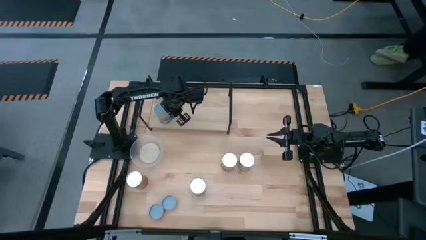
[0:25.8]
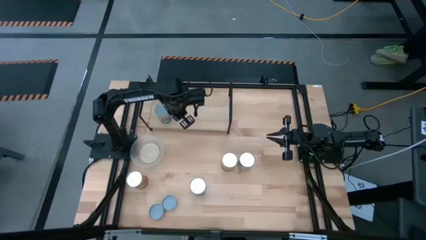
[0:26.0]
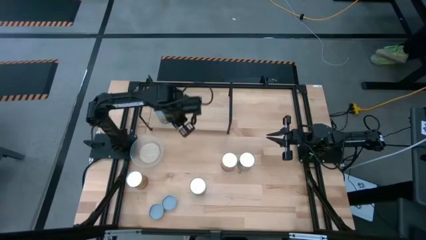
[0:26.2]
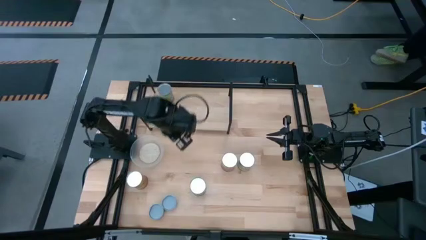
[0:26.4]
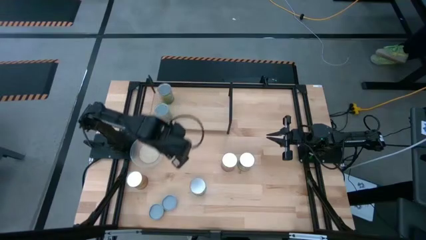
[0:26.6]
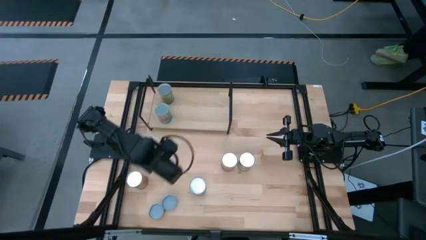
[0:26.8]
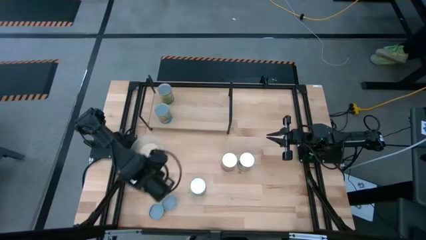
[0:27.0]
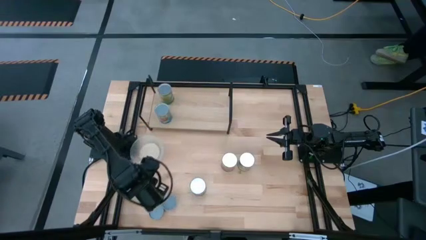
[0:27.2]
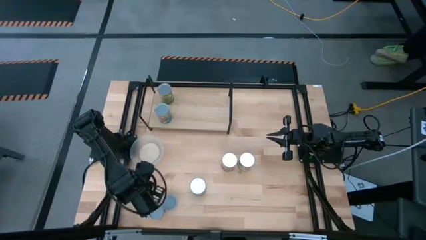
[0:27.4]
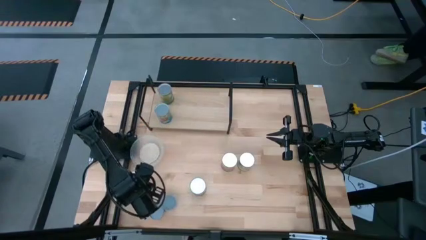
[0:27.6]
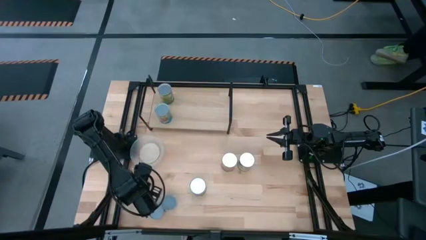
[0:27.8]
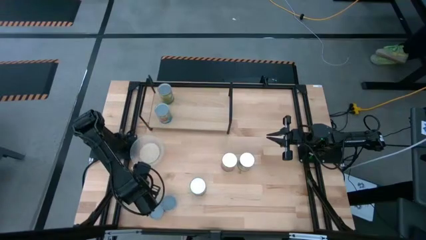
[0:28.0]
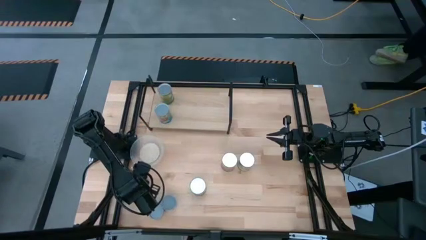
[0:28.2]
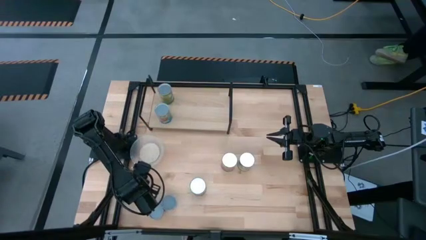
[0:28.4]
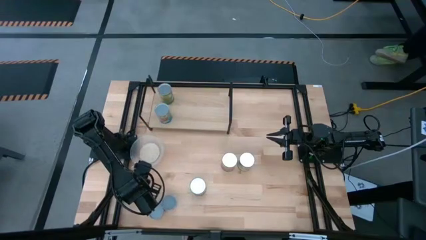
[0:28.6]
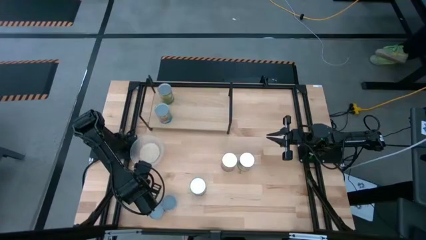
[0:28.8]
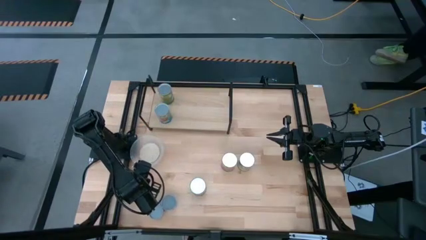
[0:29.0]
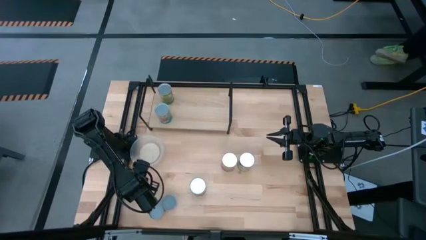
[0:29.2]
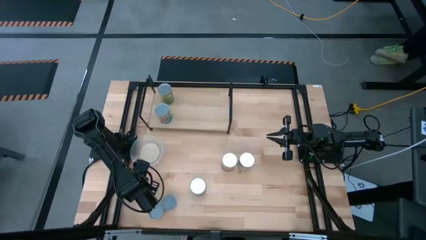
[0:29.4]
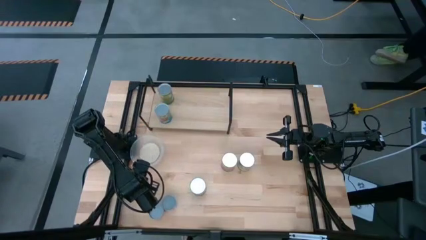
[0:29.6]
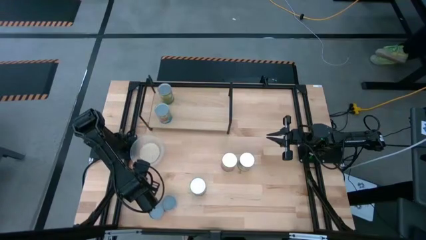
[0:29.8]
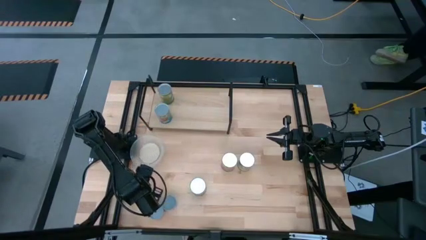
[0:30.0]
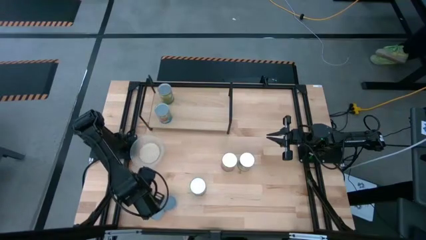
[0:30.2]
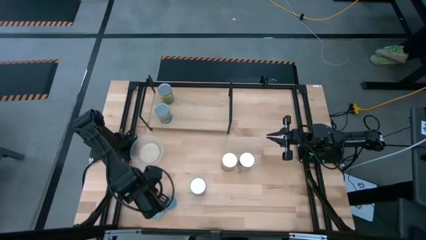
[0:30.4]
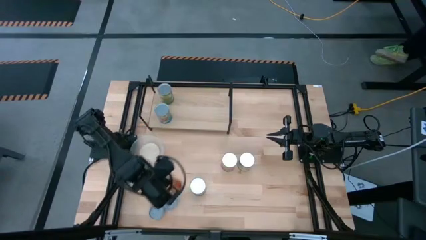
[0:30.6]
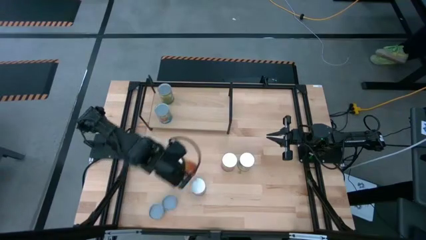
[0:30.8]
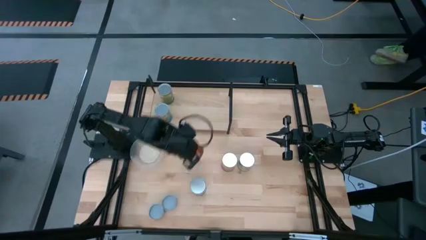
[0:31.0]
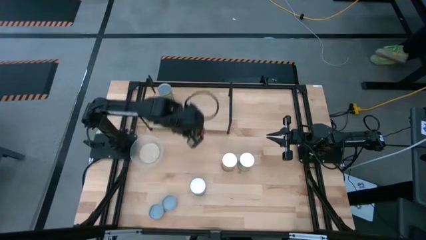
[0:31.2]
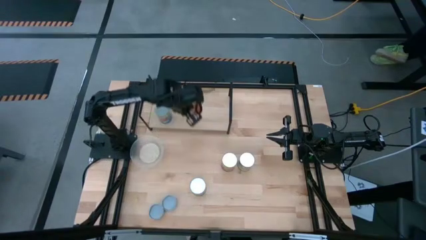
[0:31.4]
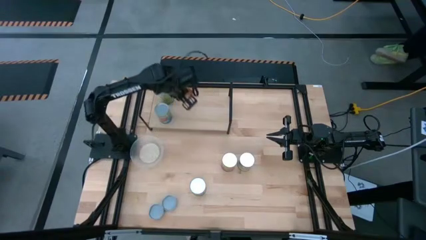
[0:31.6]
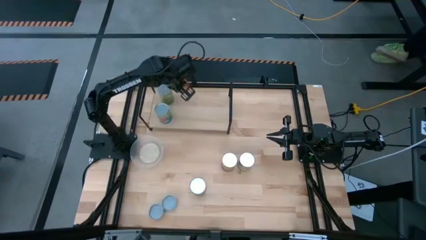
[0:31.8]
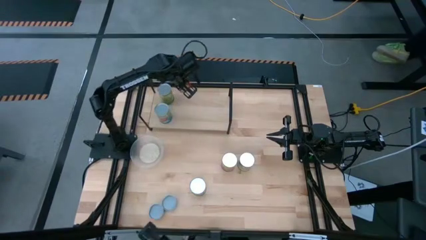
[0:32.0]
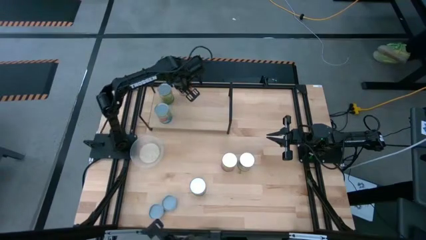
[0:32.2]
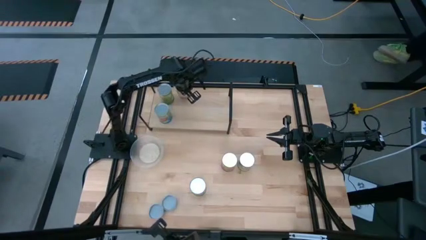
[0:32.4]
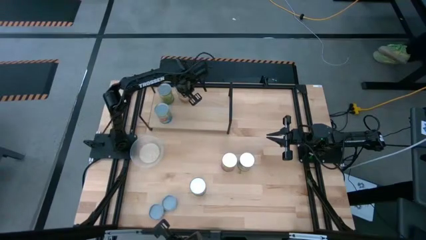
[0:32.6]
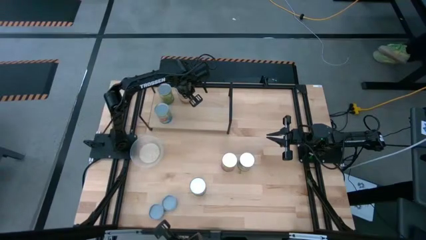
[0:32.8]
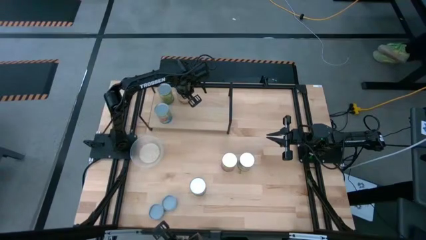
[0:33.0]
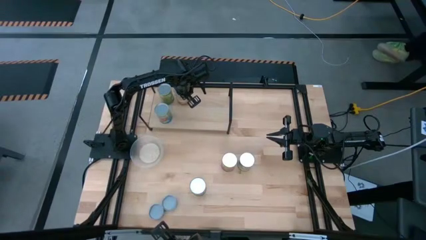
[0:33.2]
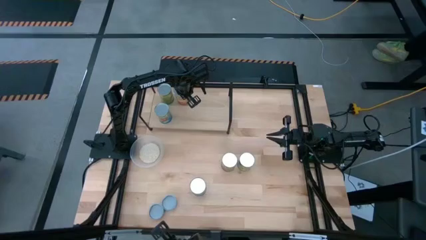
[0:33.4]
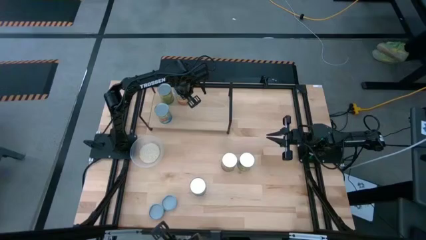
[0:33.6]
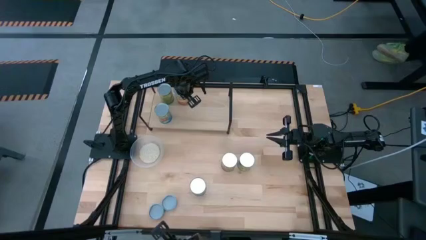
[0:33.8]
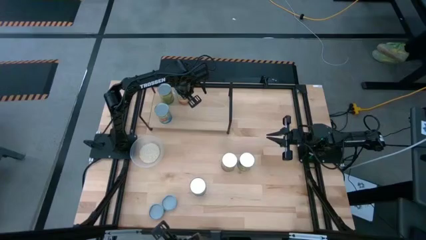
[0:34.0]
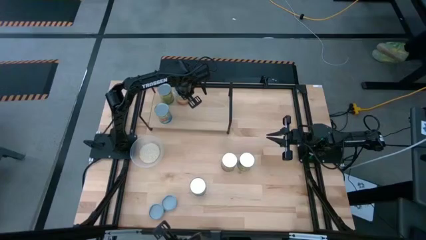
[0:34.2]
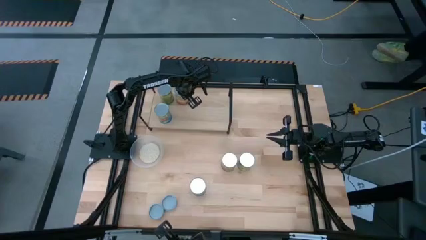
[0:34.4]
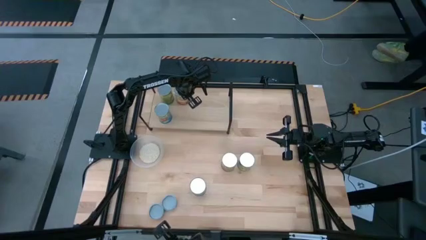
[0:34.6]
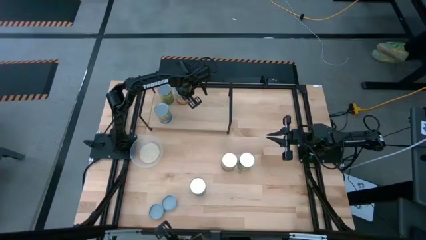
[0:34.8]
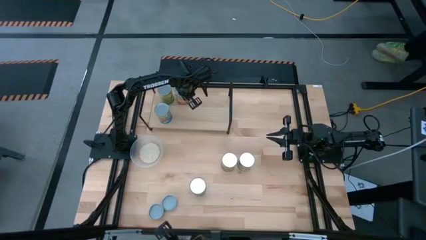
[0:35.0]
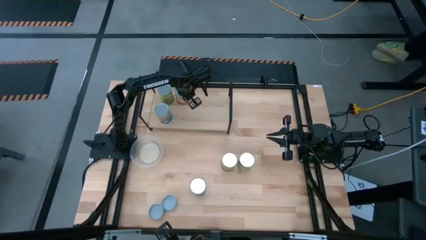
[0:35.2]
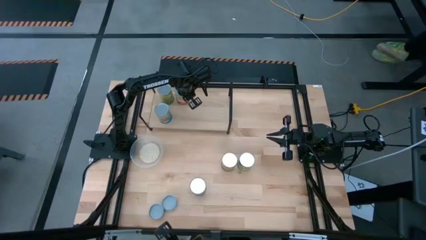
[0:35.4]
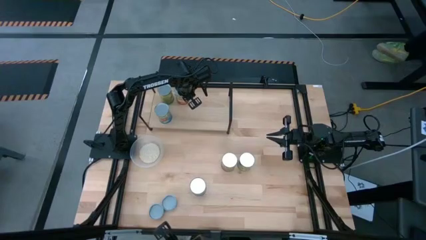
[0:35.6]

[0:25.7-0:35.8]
Task: Pick and place cans onto a shelf
Put the corn can on the shelf

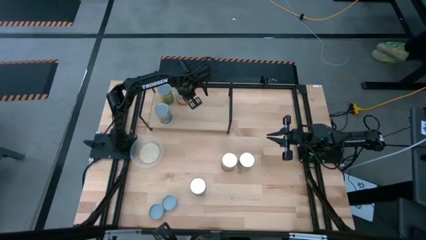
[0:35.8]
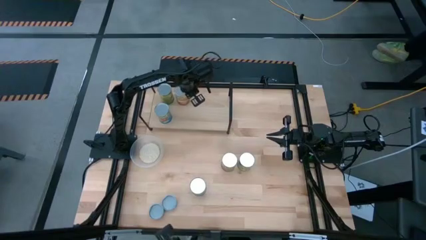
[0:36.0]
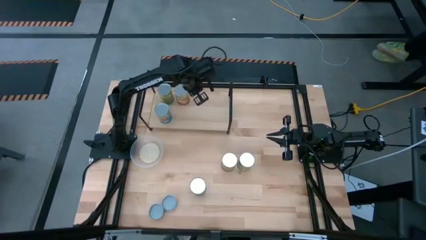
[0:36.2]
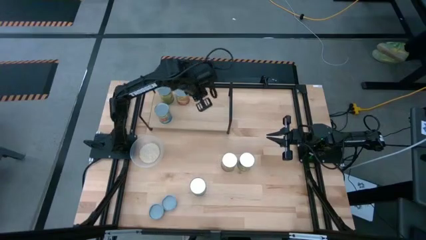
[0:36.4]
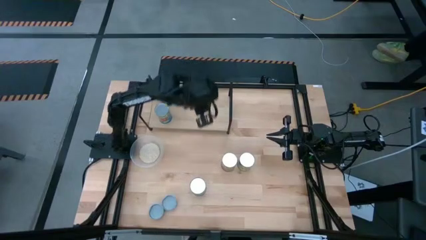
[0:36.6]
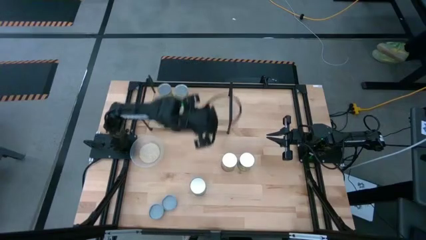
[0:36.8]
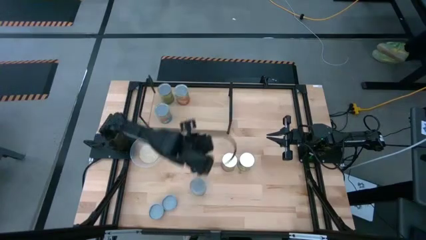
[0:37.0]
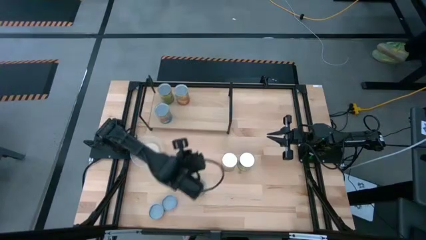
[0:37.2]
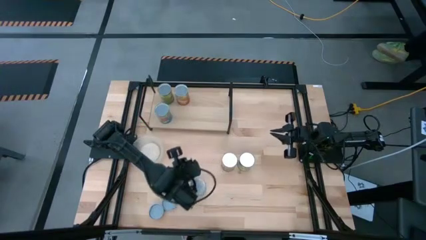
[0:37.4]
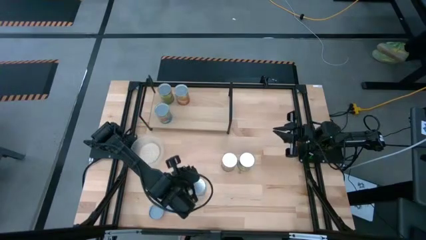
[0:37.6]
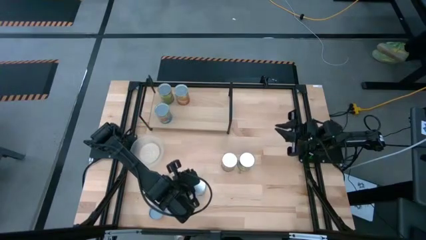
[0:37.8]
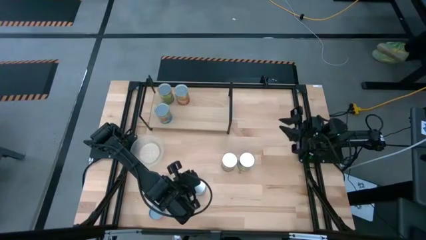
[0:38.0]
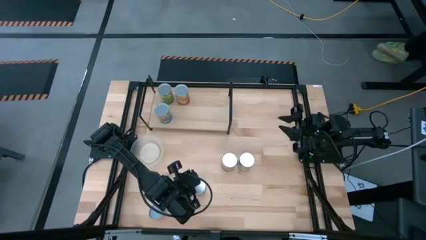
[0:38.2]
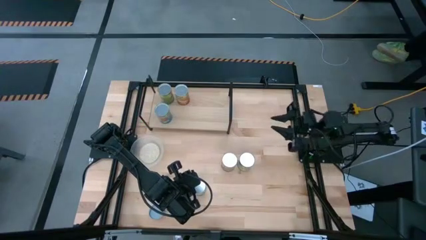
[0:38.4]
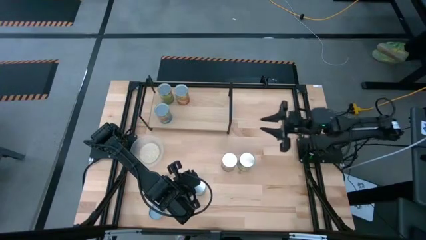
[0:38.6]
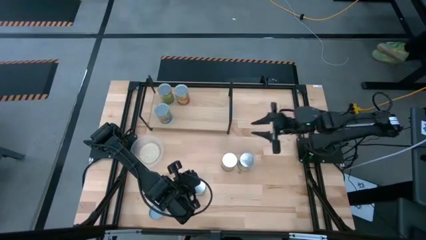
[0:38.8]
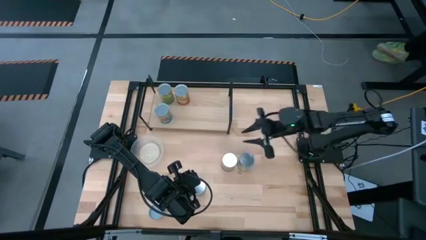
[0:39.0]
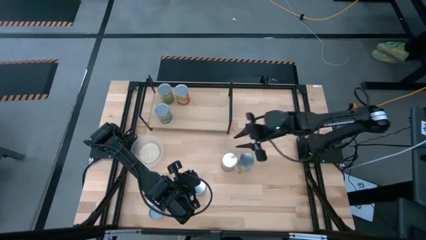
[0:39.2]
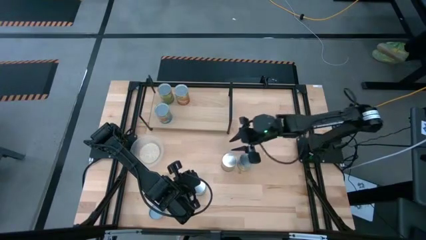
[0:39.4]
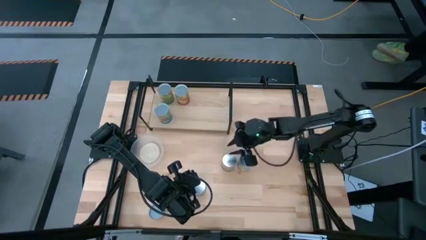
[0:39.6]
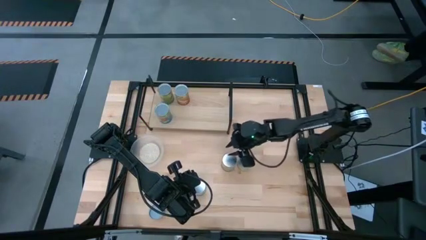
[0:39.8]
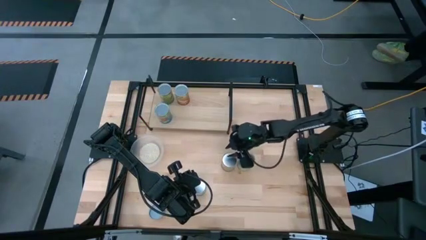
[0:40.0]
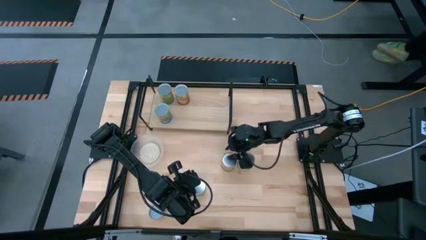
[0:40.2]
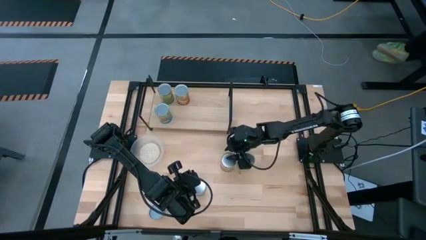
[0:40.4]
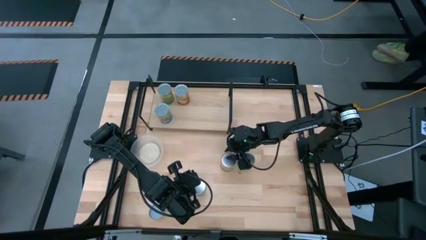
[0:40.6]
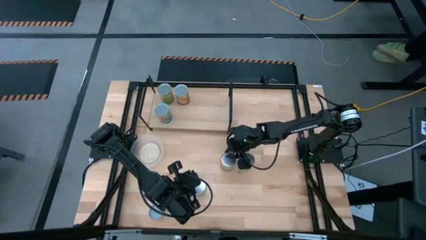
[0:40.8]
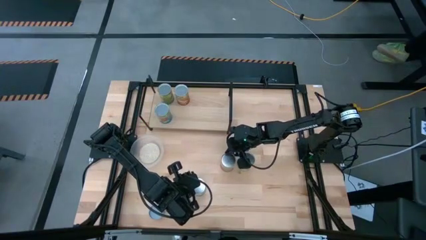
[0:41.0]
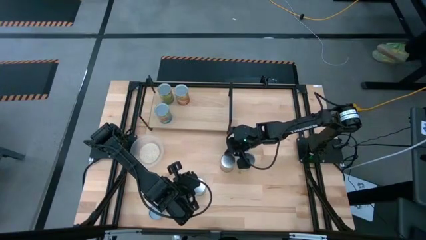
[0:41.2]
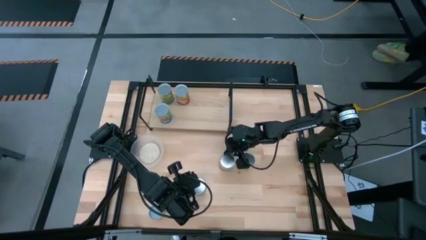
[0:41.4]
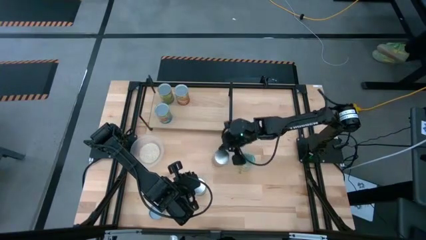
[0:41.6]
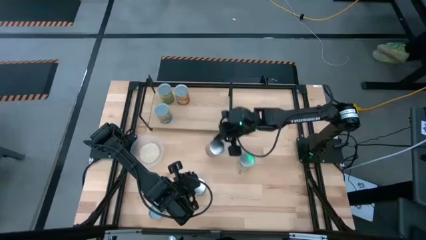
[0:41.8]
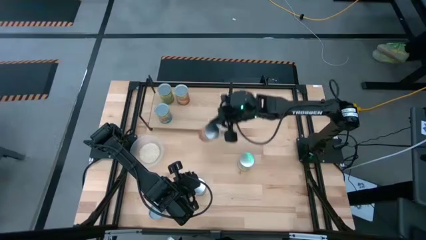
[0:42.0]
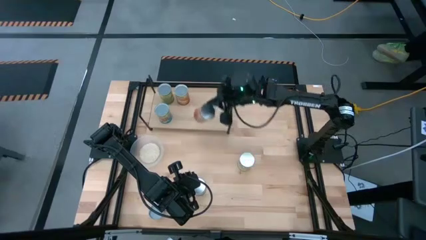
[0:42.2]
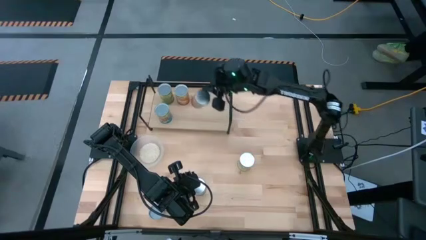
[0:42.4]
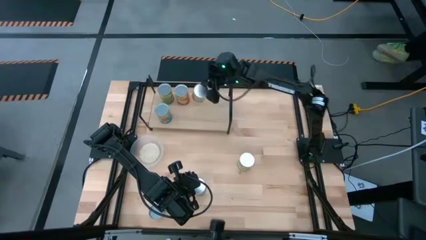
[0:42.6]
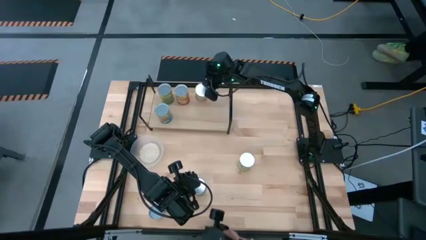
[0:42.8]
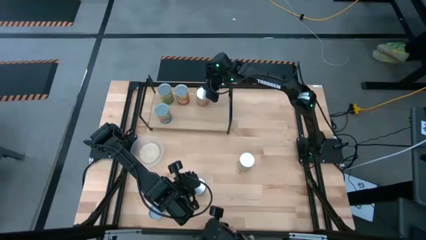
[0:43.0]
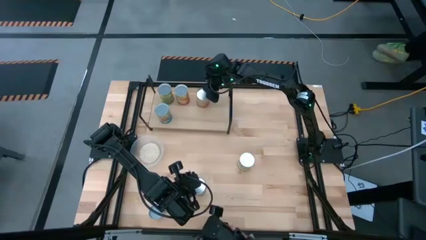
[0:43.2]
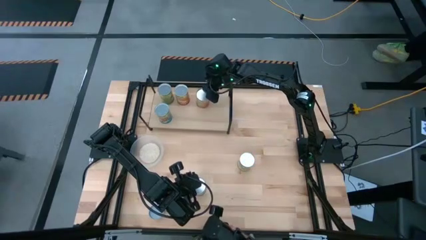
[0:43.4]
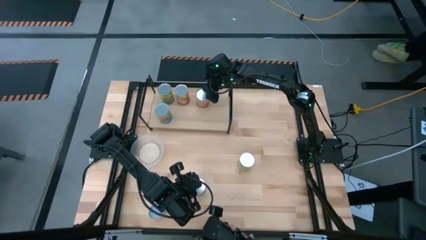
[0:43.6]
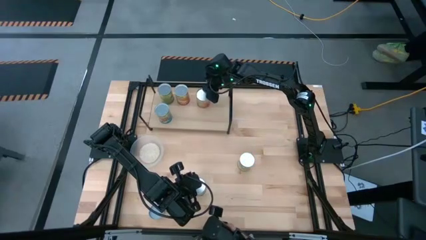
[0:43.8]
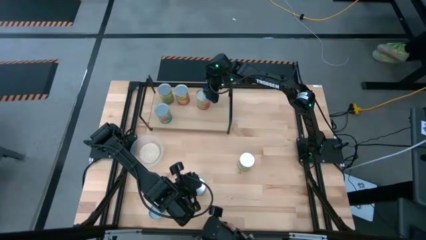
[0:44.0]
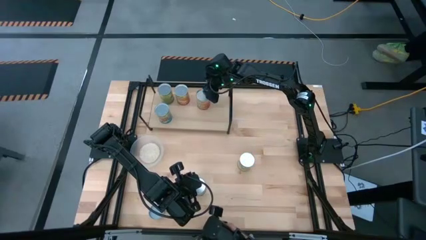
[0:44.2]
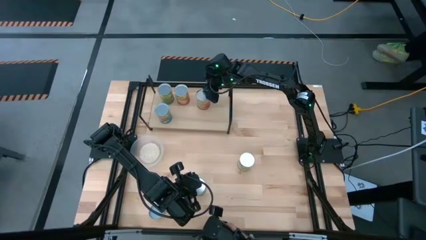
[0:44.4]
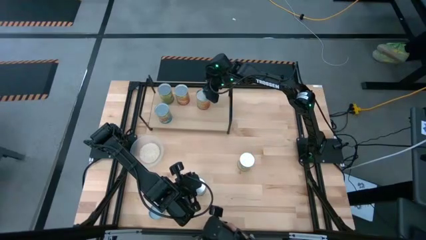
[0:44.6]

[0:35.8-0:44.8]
Put the green beans can on the shelf
